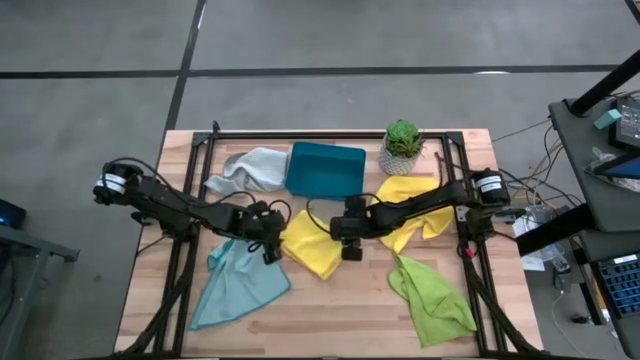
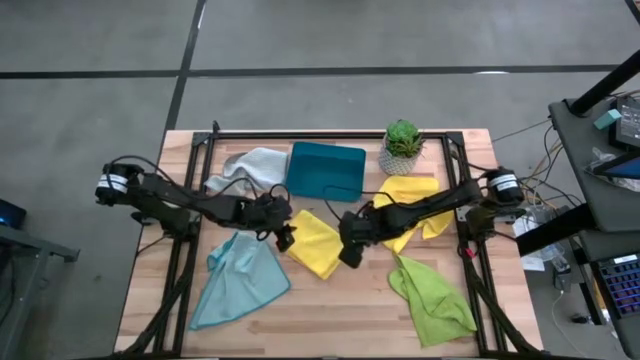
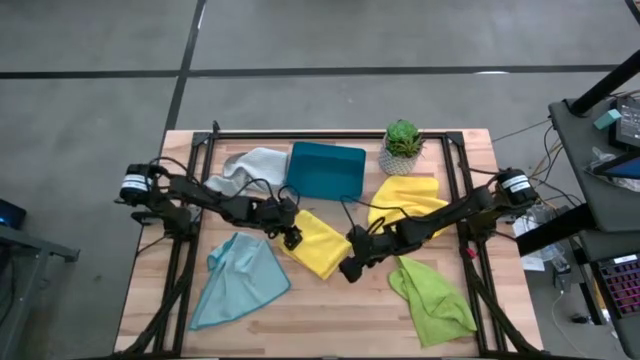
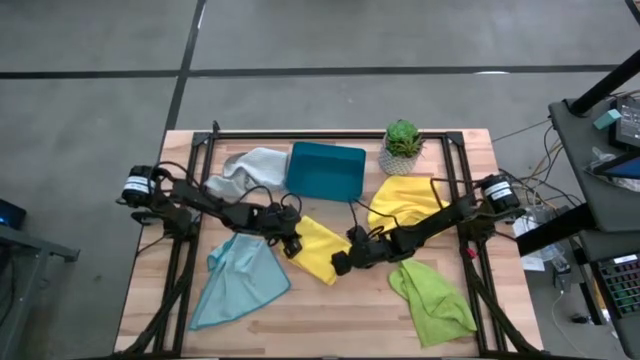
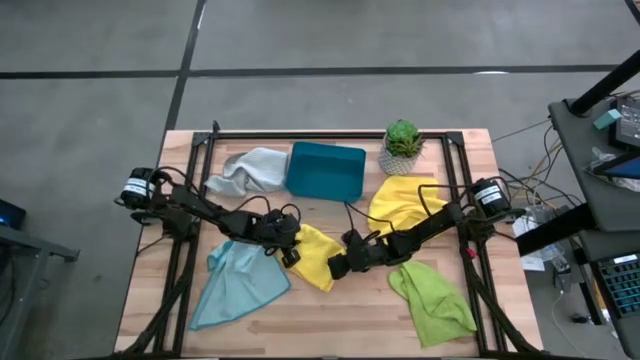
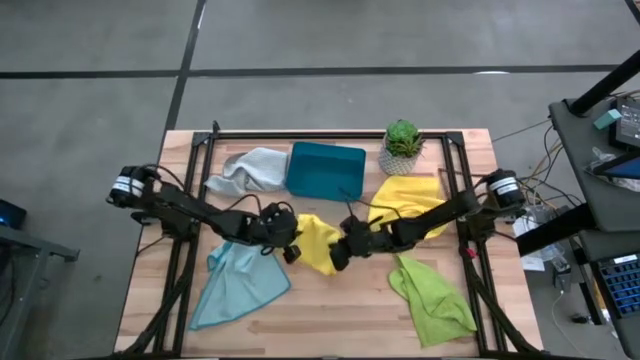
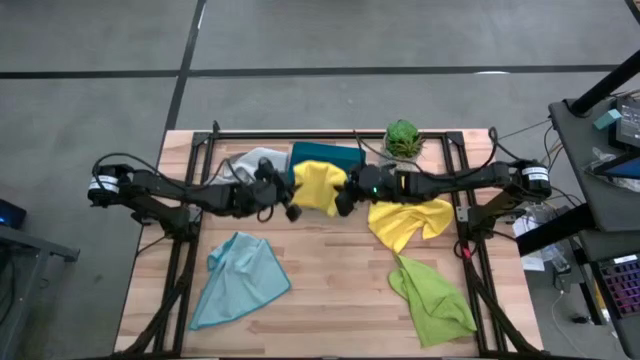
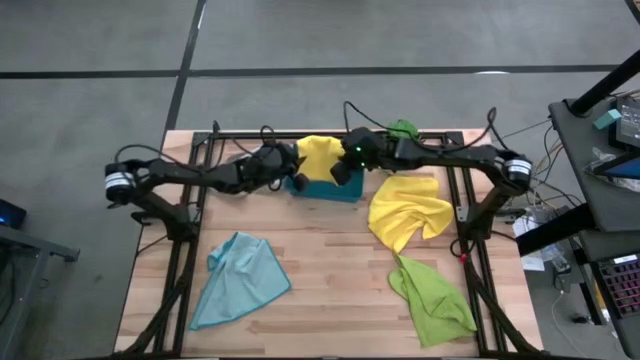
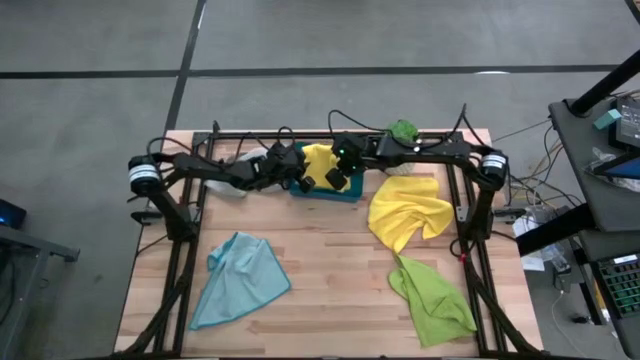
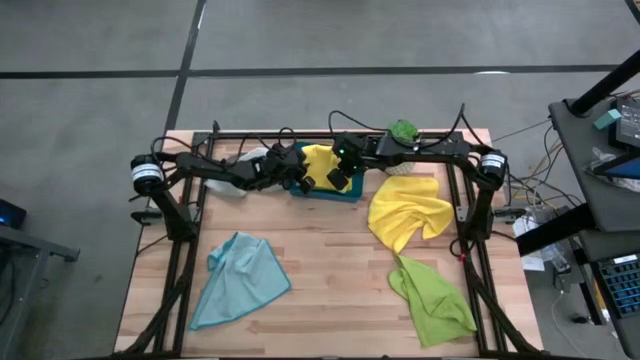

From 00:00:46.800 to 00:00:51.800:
Task: Fold microfiber towels
Put the folded yellow microfiber cloth into the bin

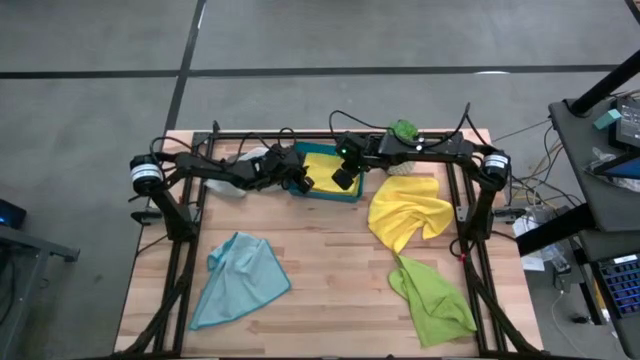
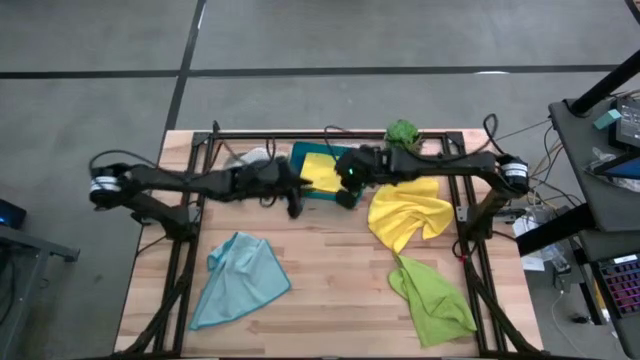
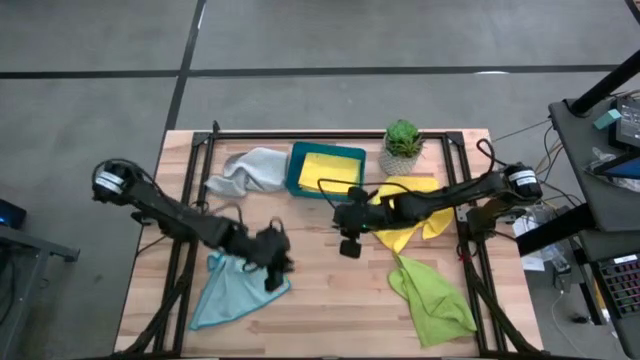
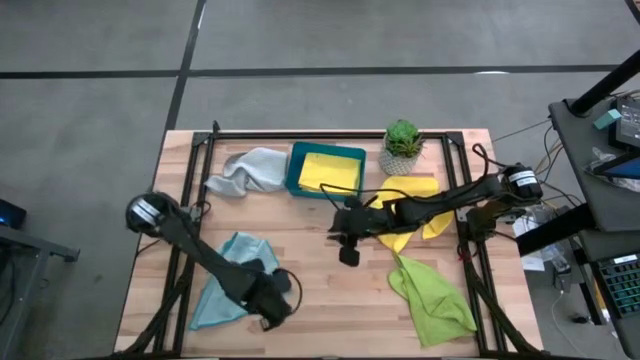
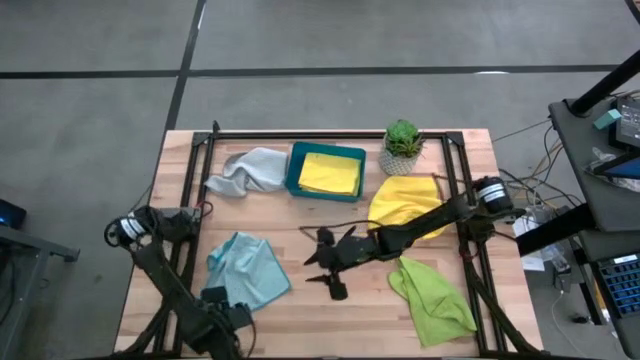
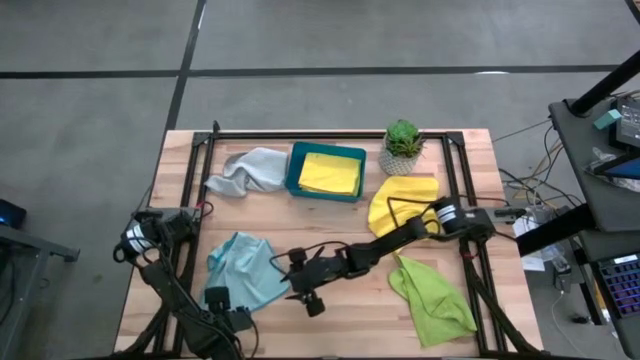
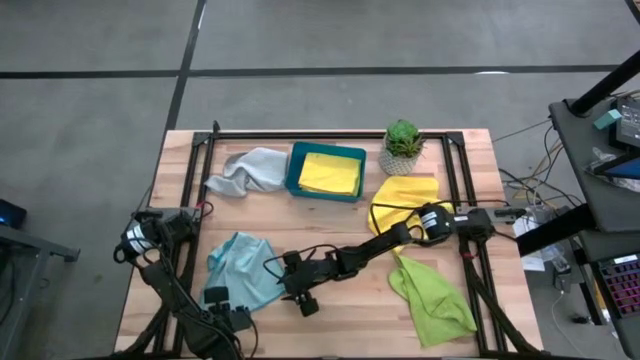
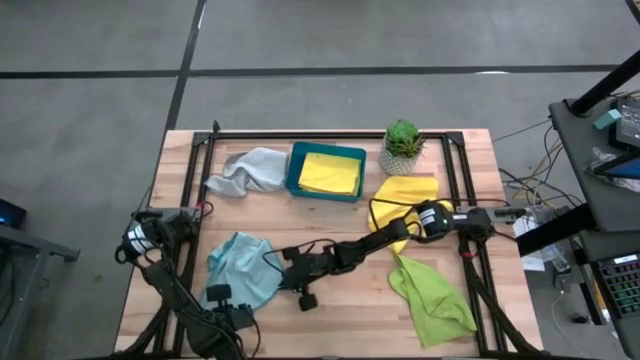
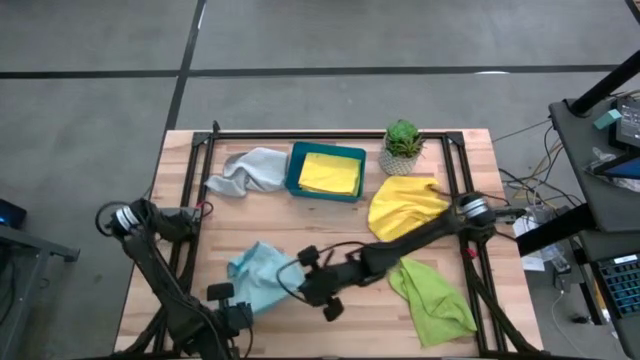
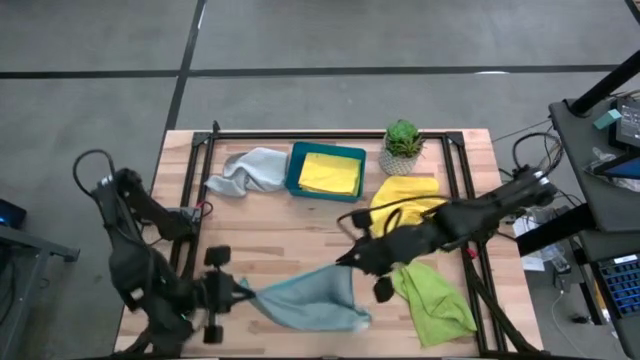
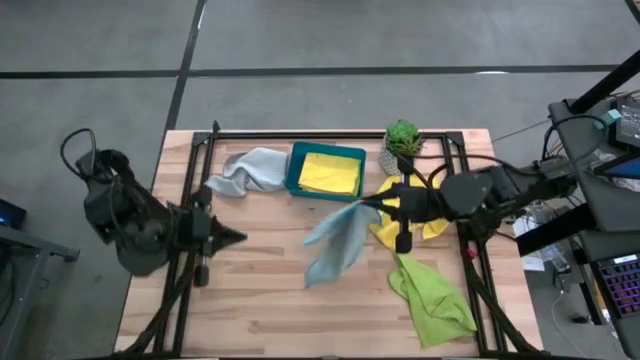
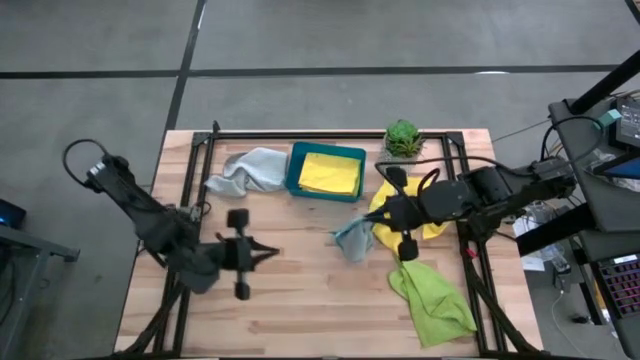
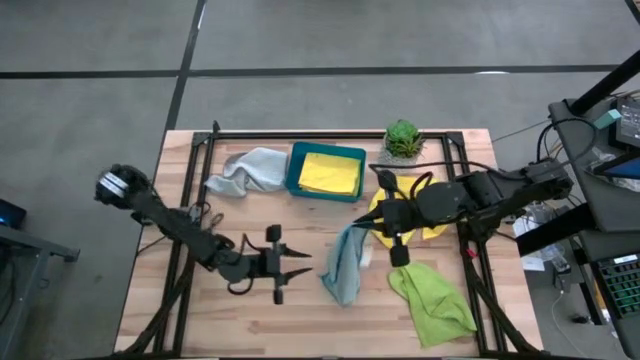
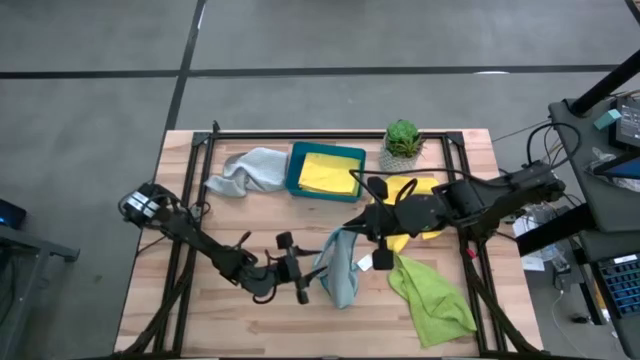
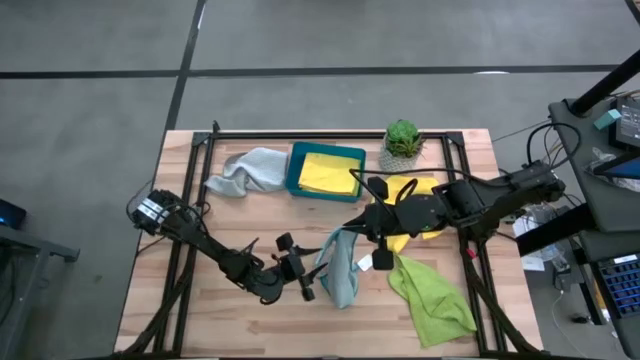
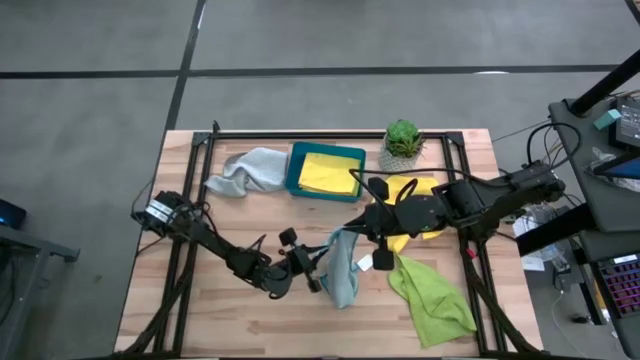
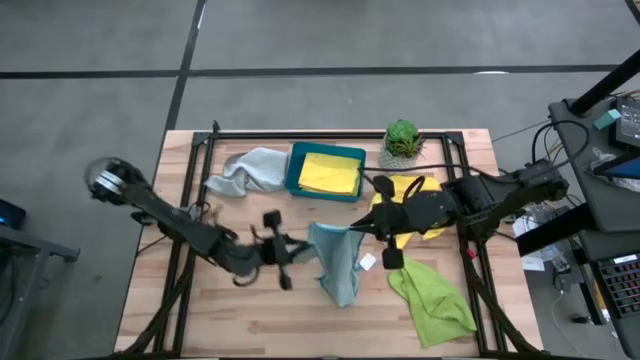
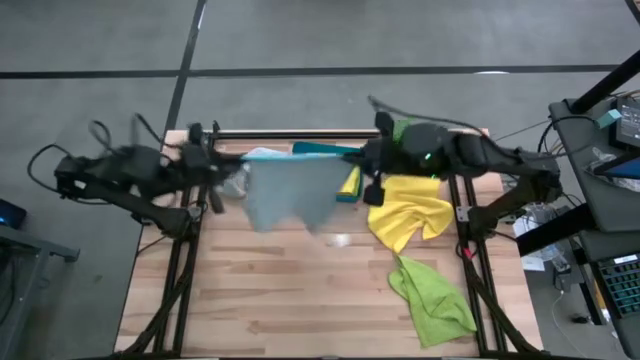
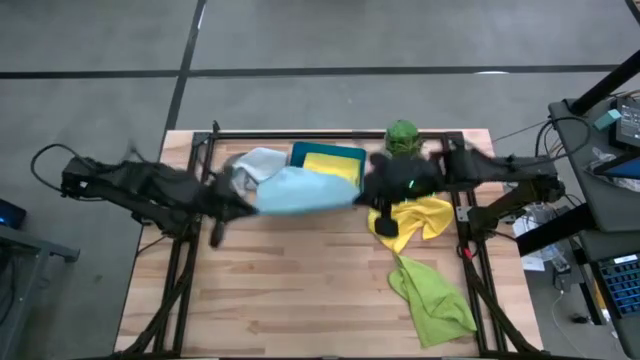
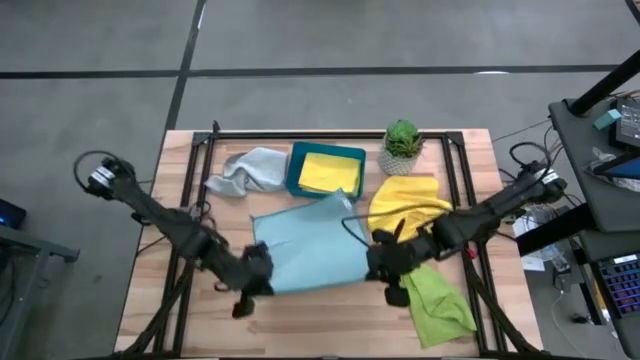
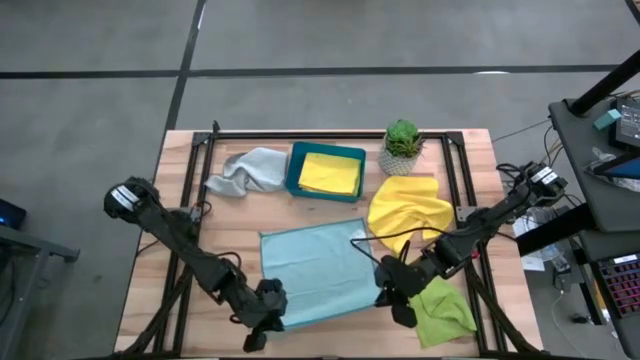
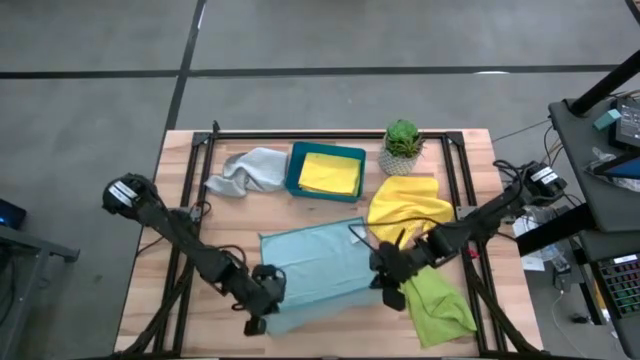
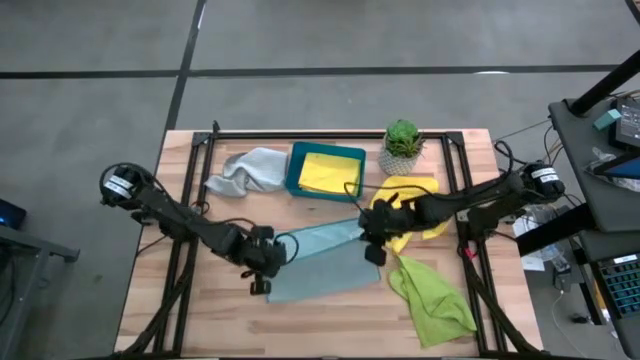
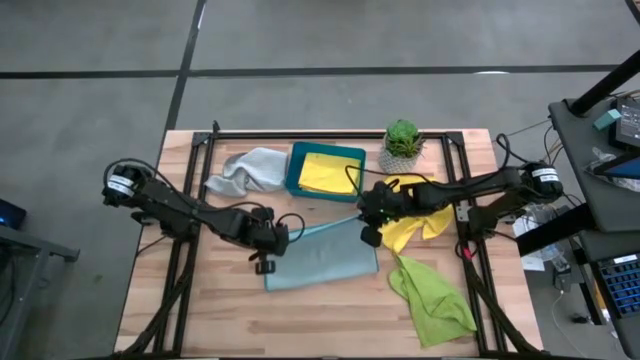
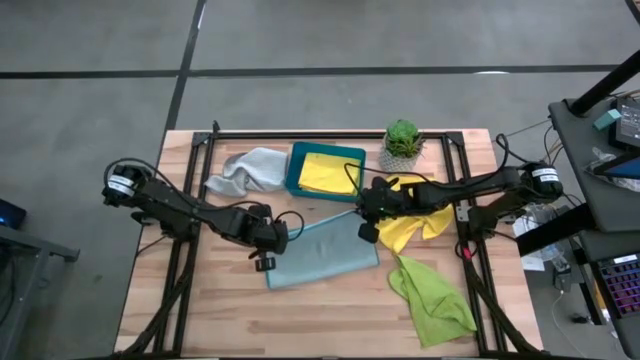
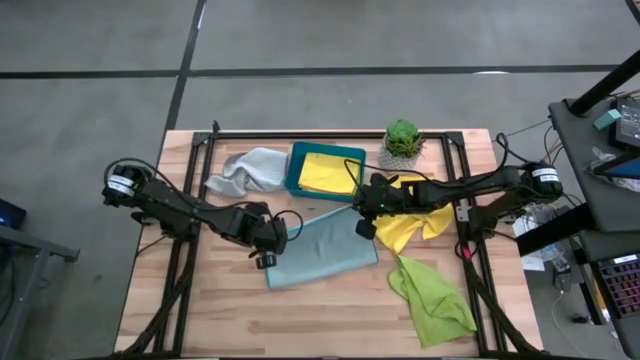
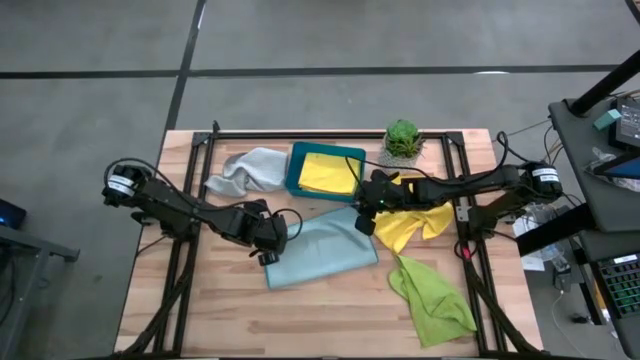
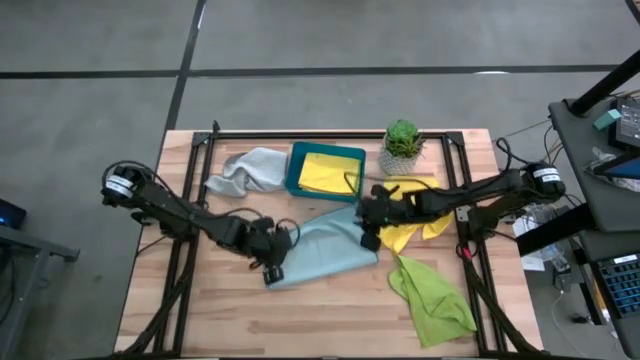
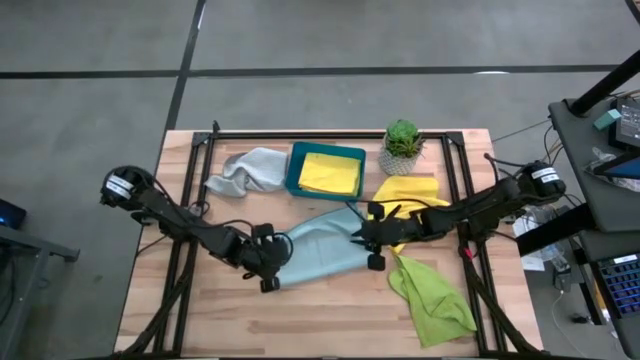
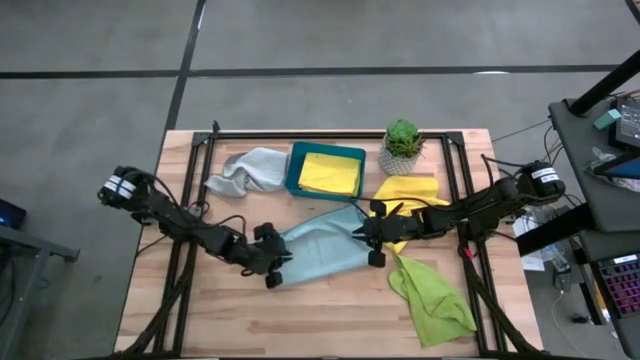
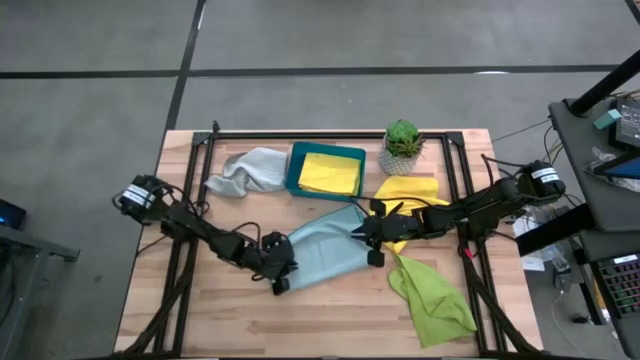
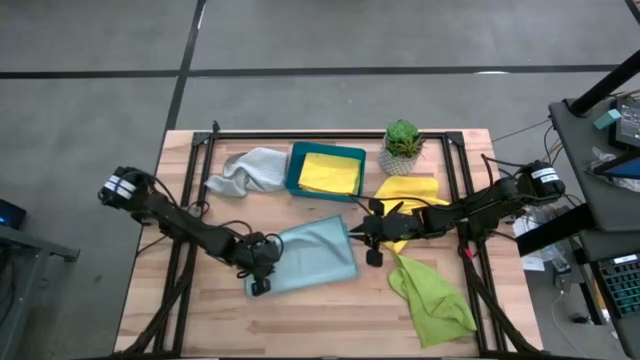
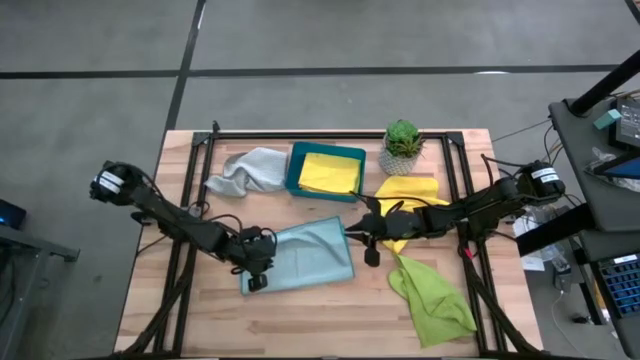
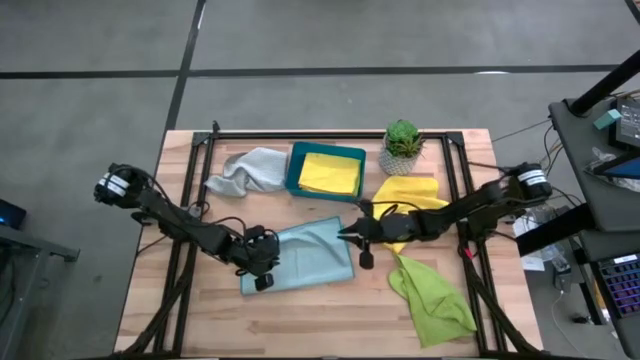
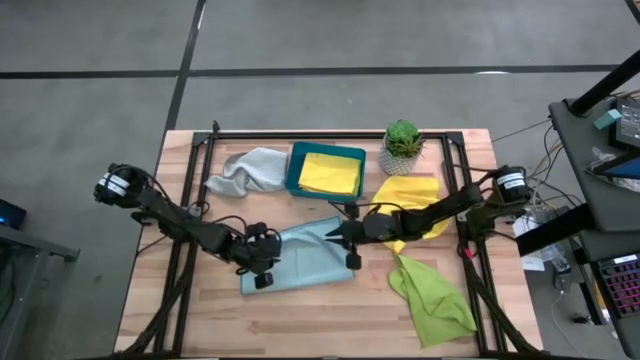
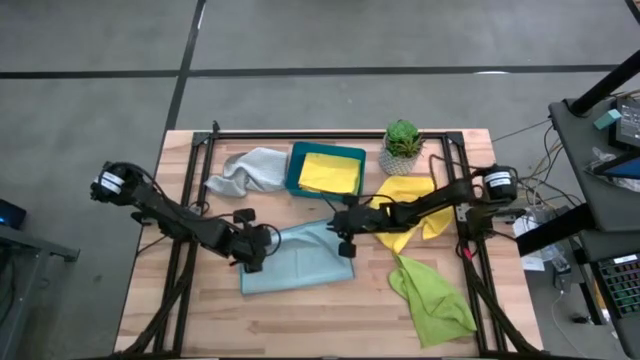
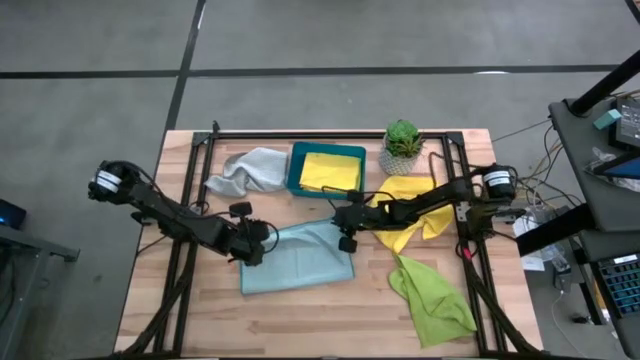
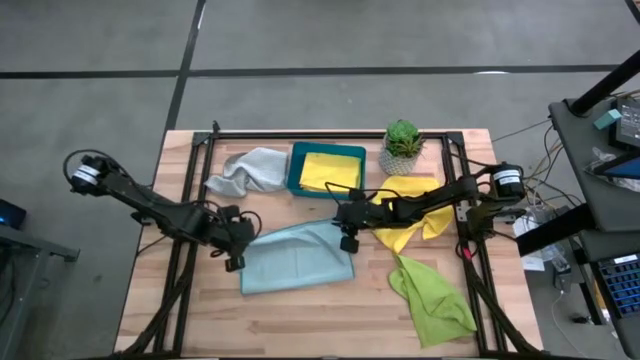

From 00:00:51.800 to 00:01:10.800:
Fold the light blue microfiber cloth
